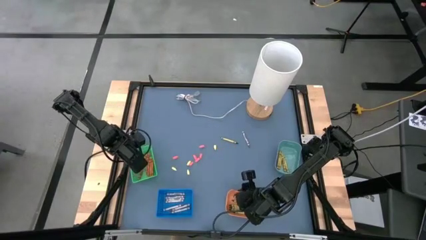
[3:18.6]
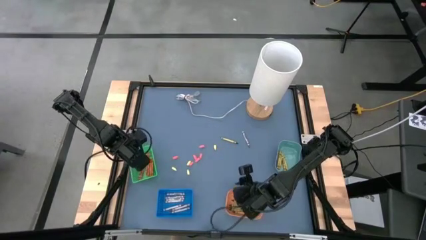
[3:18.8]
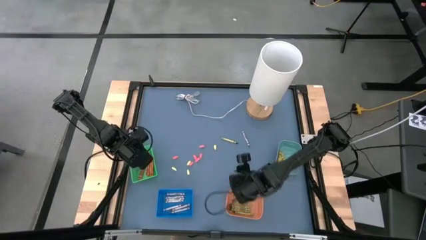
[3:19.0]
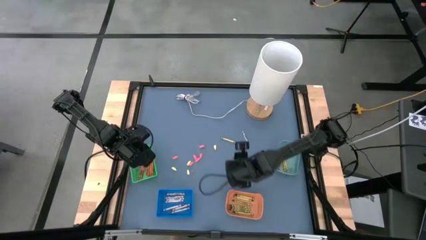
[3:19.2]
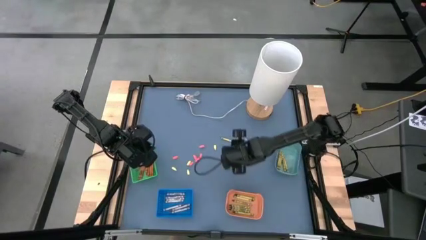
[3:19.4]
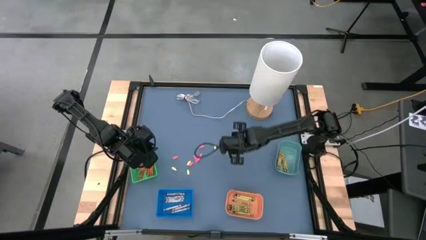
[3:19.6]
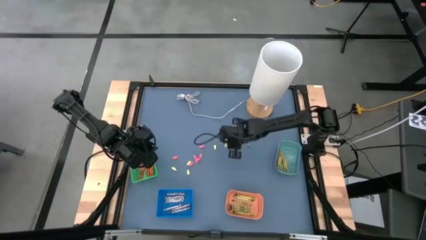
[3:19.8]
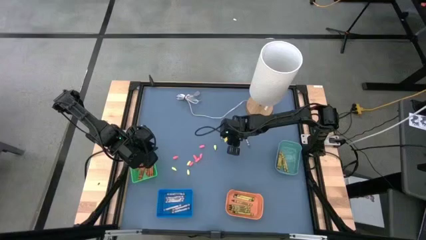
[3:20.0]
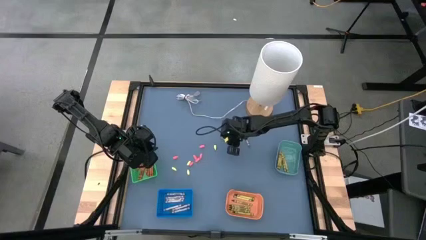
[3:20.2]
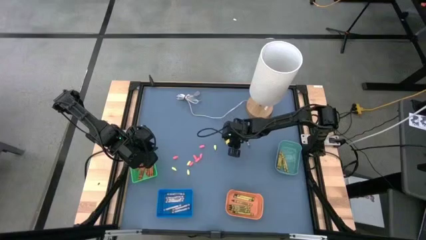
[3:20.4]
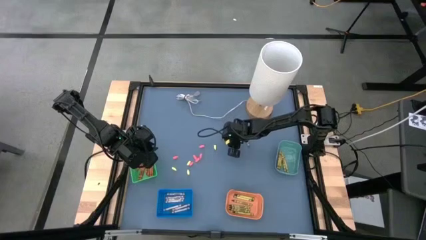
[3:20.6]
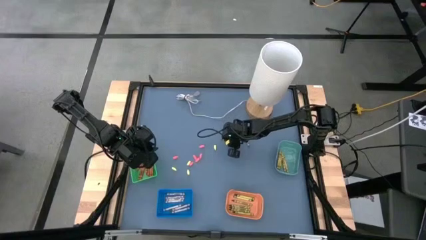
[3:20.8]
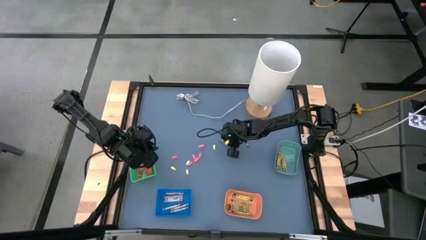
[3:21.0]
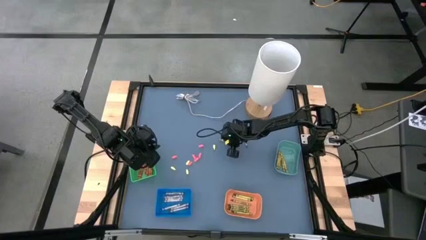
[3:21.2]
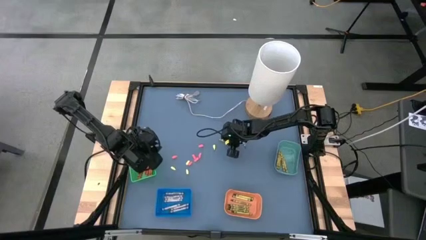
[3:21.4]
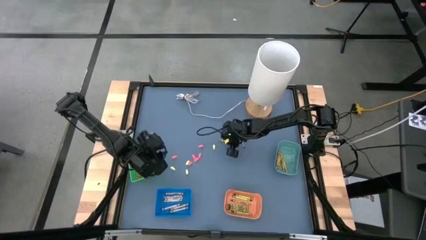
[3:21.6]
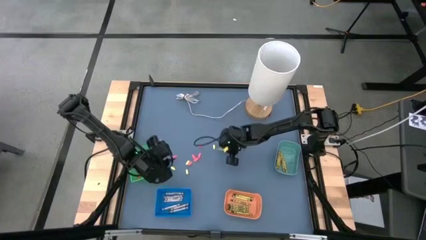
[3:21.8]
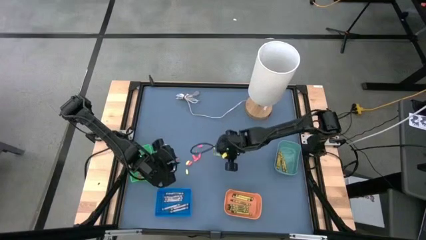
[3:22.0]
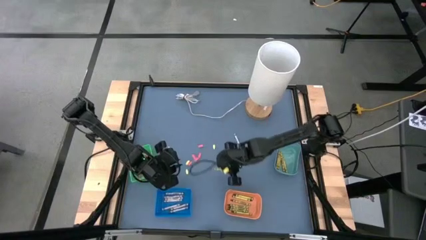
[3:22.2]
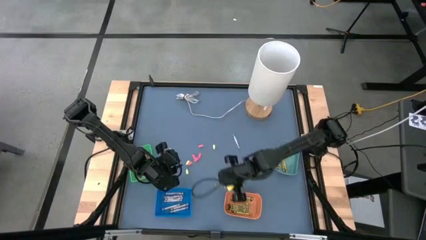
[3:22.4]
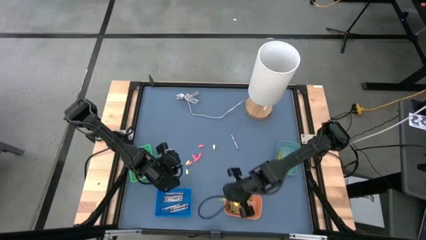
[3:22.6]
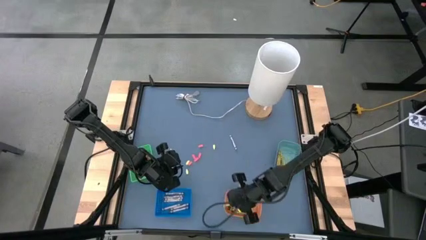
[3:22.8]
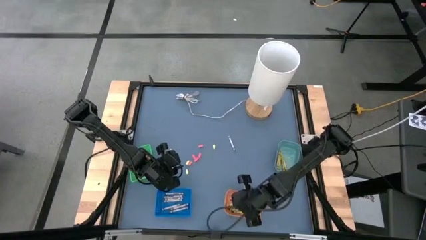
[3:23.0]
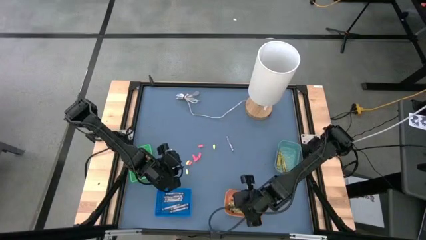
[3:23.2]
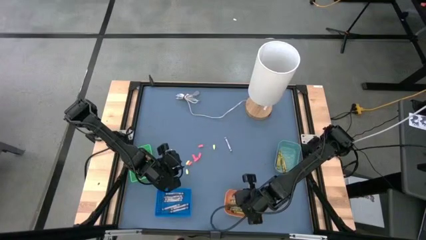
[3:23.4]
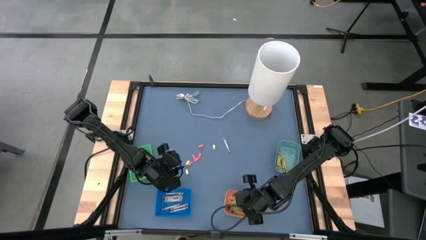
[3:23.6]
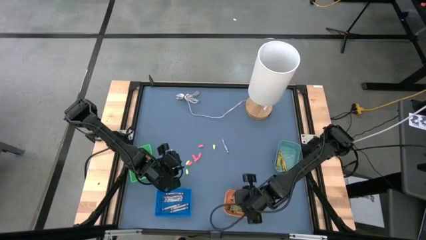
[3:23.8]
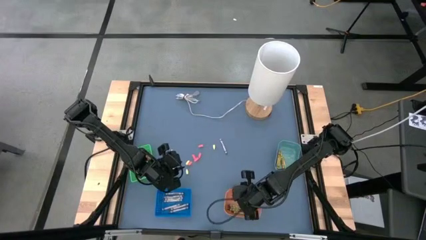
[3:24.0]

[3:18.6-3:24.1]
Task: Sort crayons
Put the green crayon into the orange bin

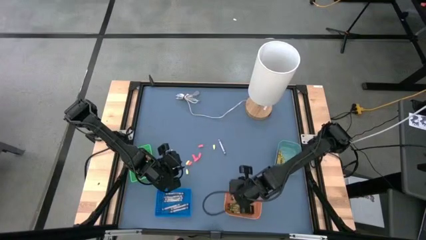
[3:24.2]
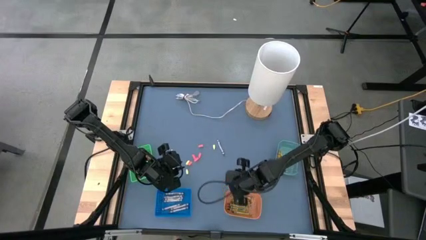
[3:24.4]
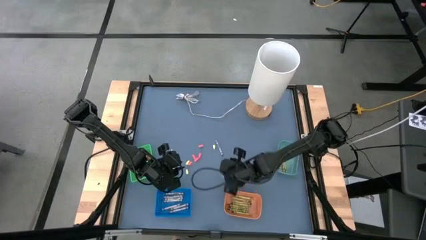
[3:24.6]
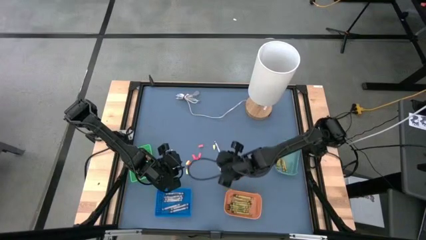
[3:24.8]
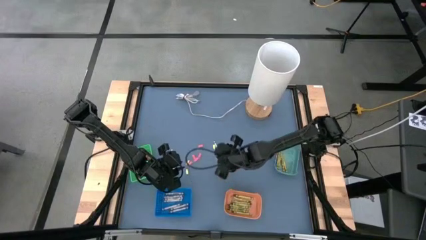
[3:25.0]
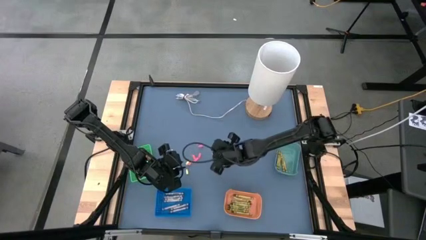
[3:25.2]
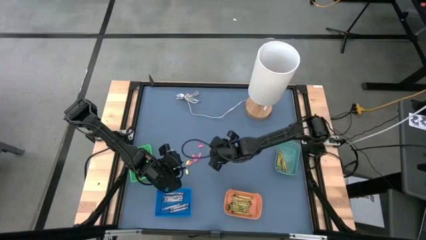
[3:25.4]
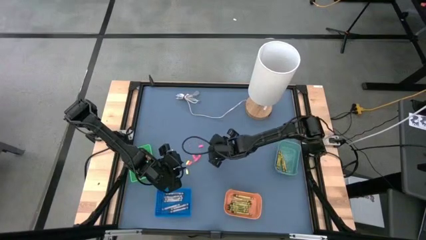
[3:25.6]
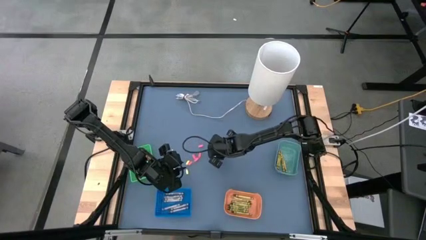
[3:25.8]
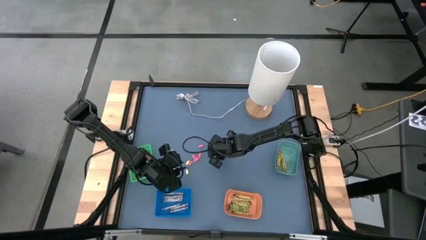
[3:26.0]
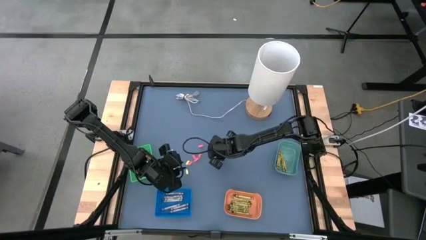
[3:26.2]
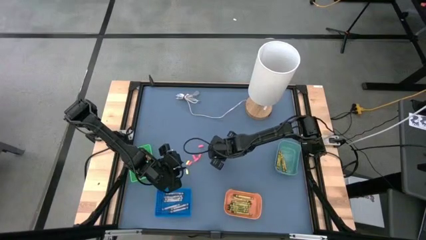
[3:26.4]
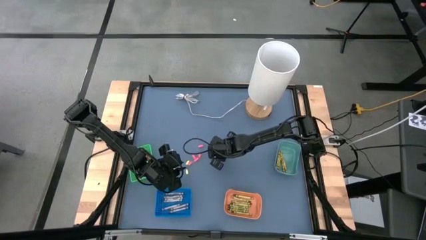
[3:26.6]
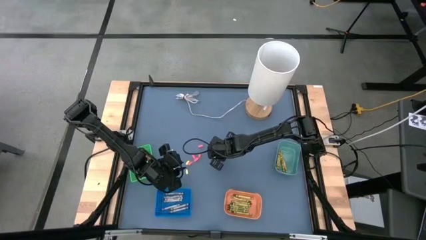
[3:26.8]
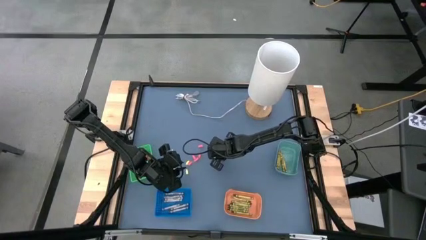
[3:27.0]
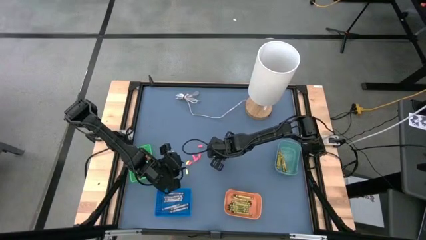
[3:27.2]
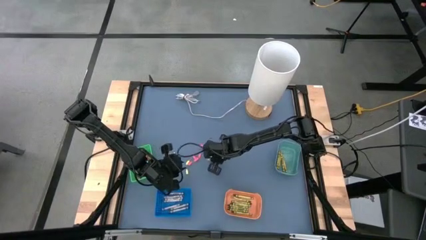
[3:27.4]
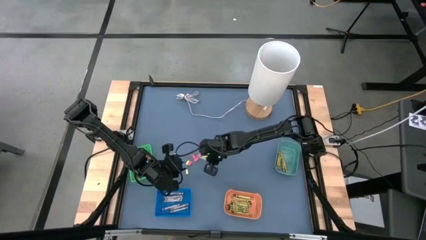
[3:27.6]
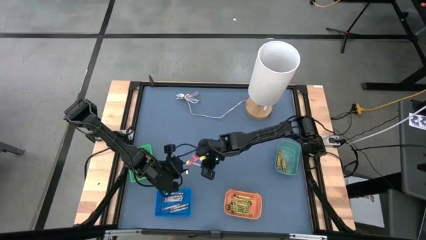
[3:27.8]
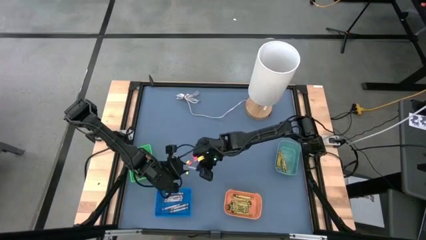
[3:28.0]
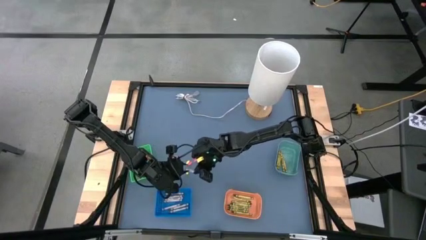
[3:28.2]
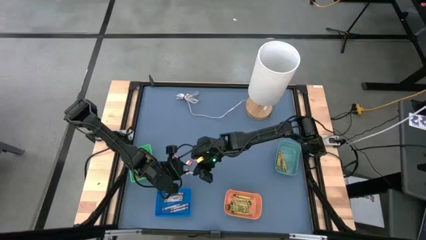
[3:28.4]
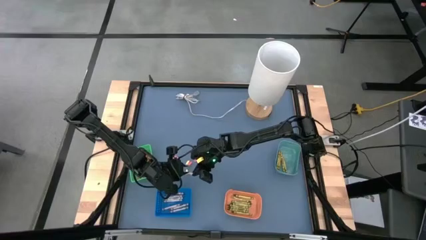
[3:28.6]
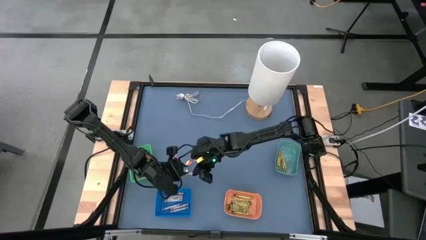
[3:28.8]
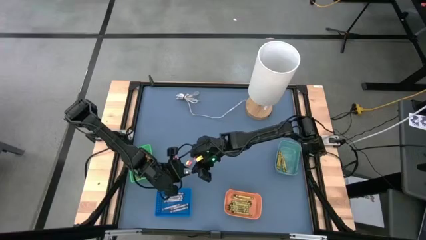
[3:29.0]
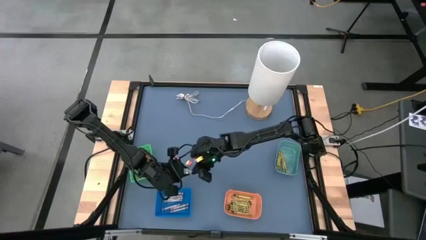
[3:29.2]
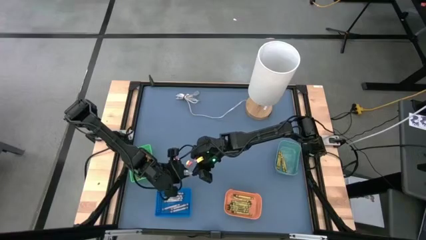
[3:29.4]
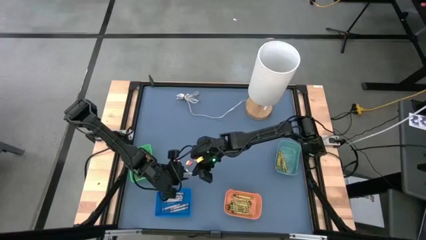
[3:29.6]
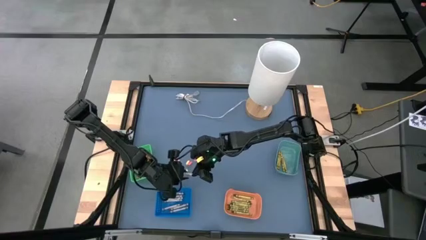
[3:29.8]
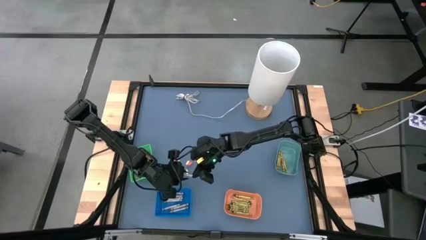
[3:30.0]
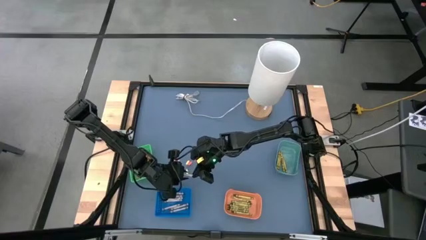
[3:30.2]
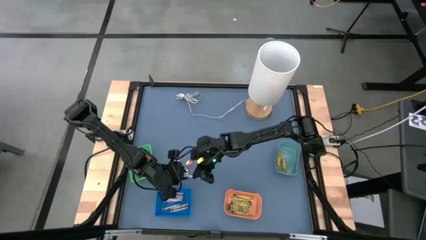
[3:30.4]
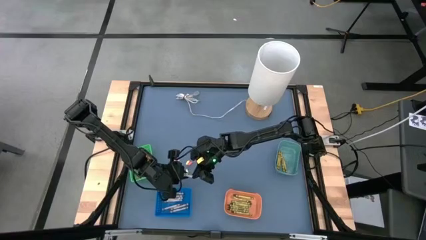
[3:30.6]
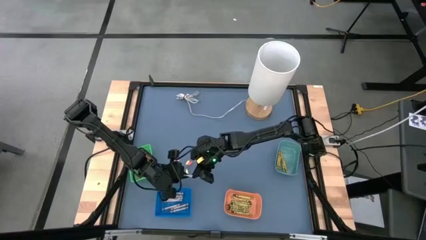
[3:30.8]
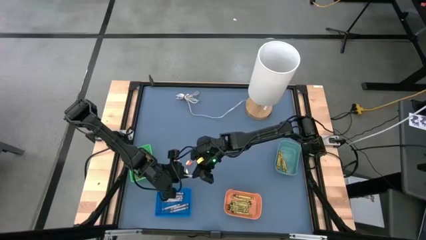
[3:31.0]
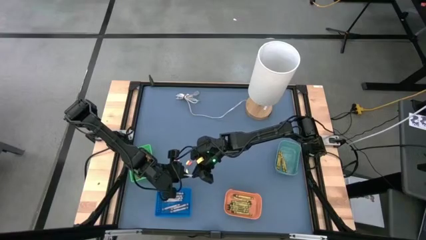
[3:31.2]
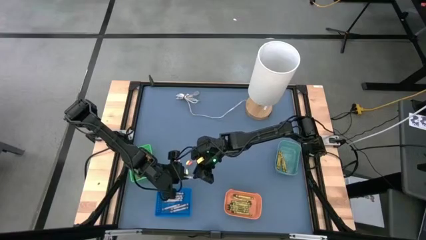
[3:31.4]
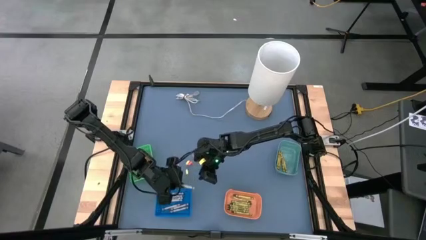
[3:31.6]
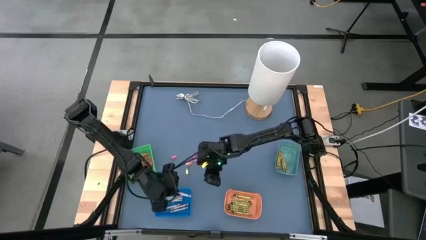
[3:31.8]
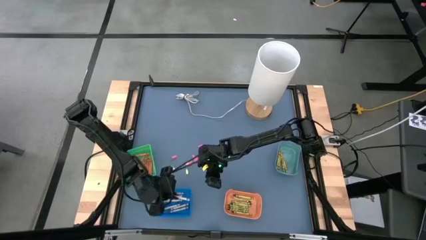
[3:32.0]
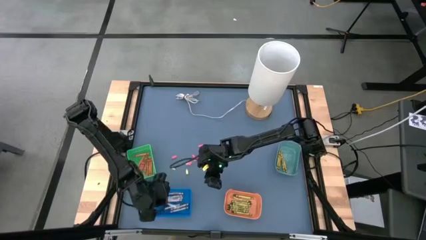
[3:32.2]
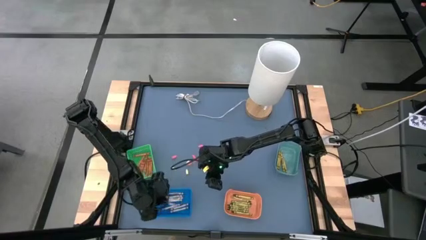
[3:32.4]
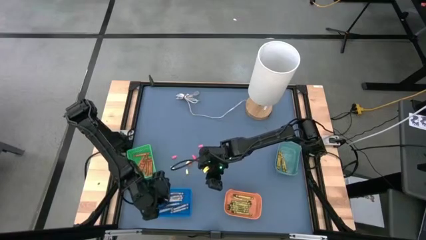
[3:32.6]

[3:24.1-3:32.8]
Put the gray crayon into the blue bin
